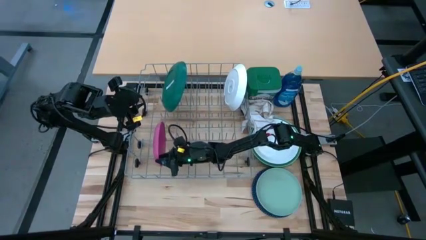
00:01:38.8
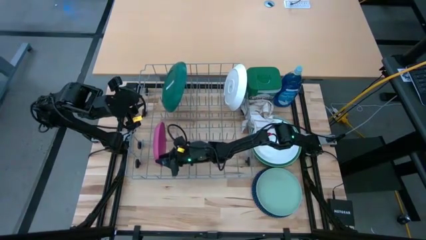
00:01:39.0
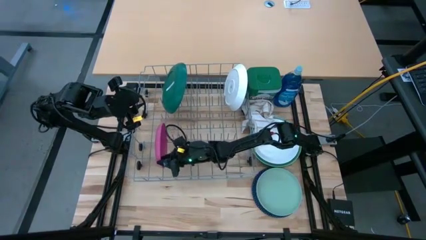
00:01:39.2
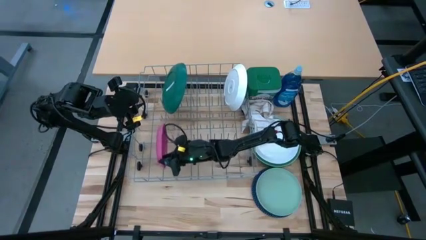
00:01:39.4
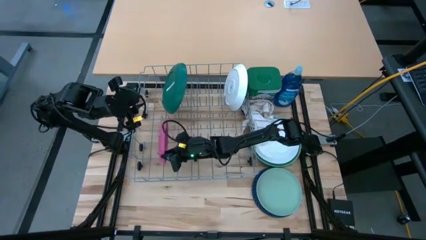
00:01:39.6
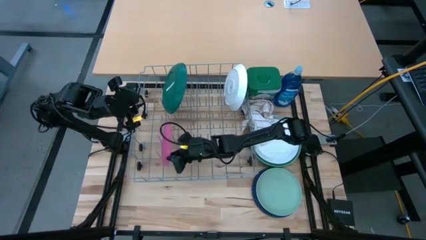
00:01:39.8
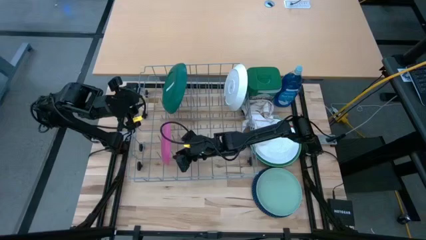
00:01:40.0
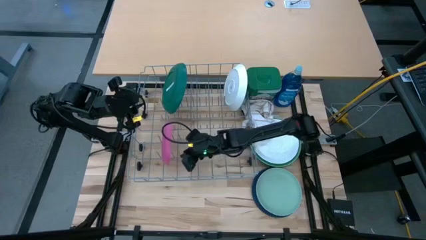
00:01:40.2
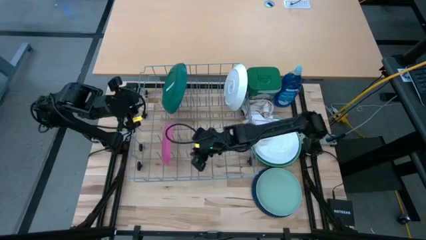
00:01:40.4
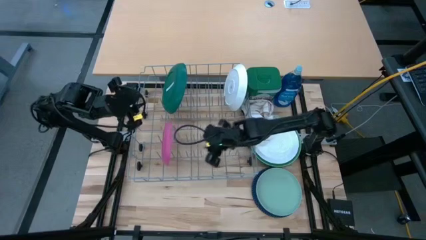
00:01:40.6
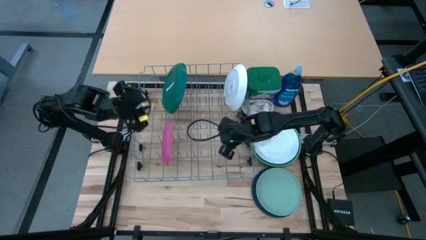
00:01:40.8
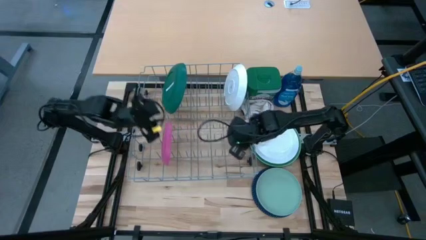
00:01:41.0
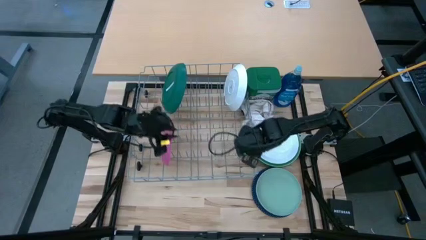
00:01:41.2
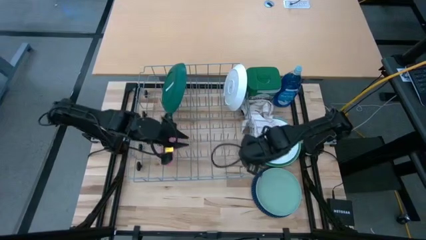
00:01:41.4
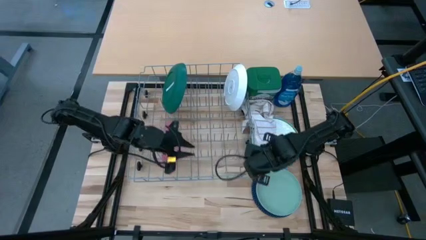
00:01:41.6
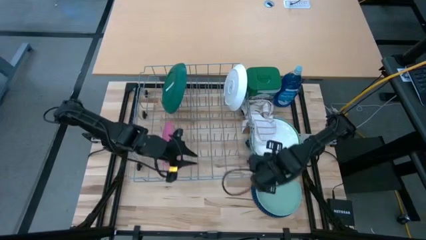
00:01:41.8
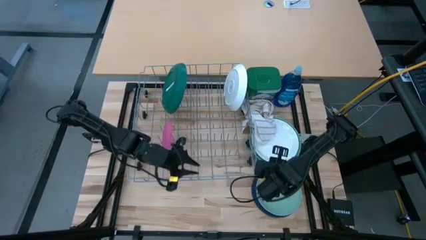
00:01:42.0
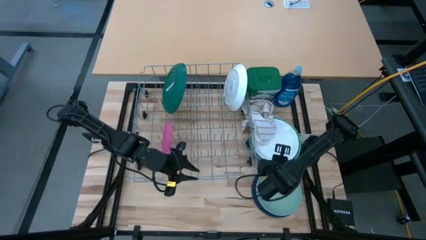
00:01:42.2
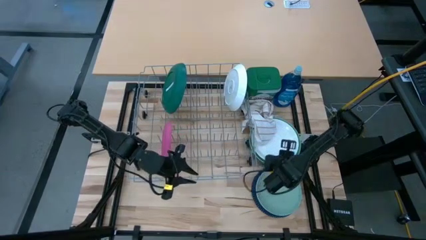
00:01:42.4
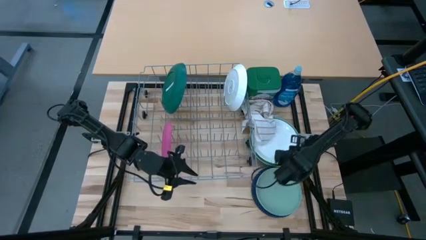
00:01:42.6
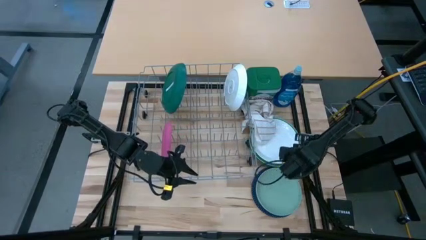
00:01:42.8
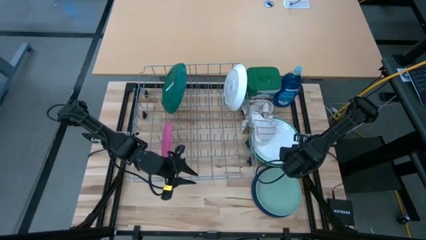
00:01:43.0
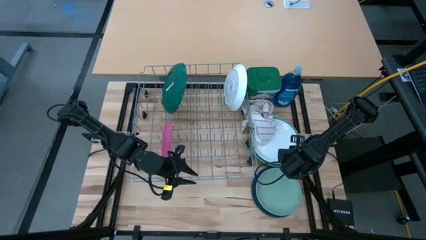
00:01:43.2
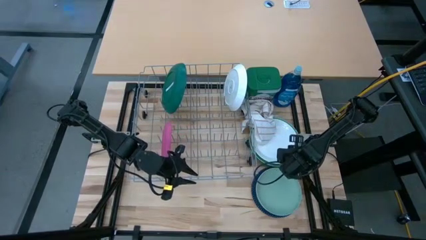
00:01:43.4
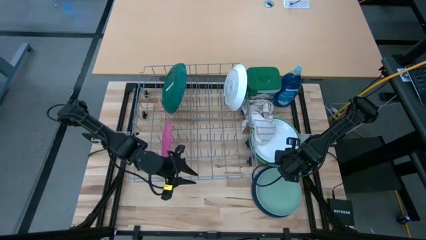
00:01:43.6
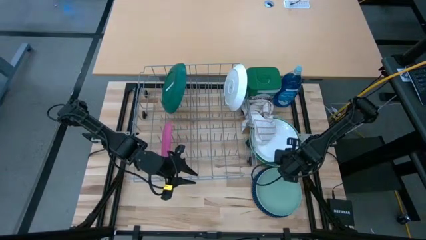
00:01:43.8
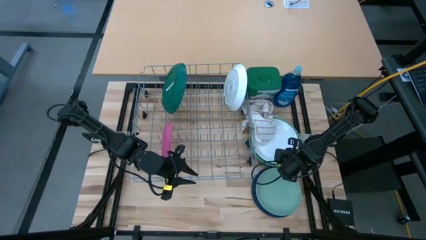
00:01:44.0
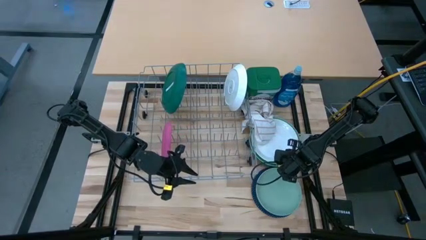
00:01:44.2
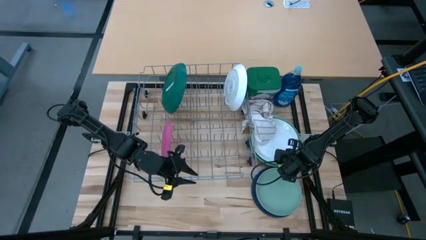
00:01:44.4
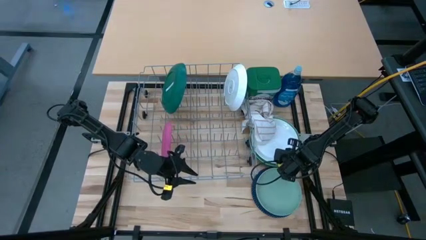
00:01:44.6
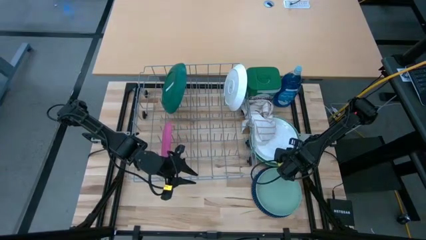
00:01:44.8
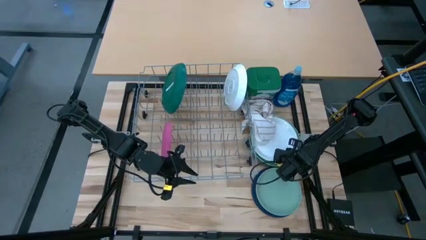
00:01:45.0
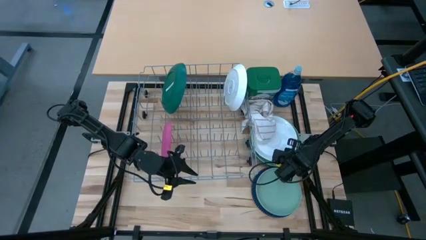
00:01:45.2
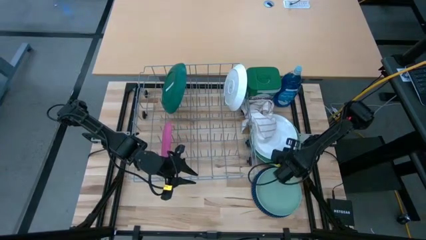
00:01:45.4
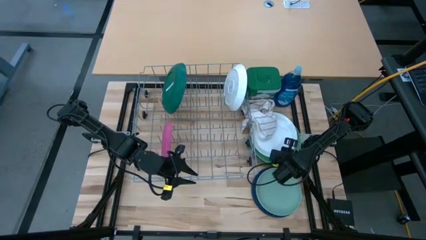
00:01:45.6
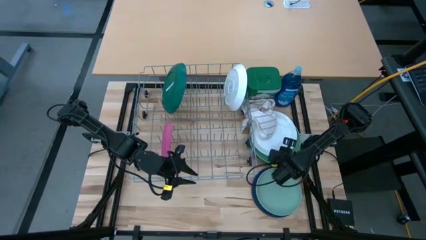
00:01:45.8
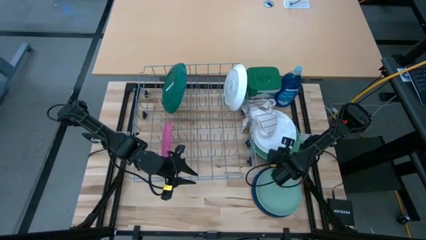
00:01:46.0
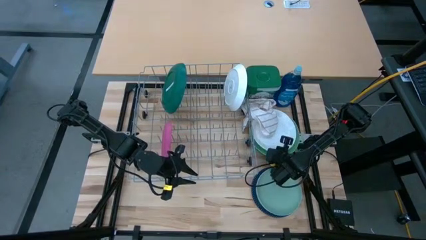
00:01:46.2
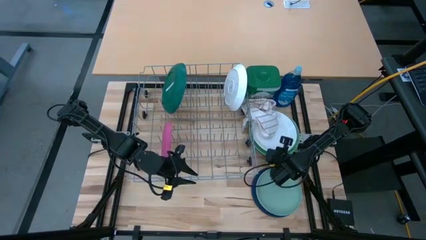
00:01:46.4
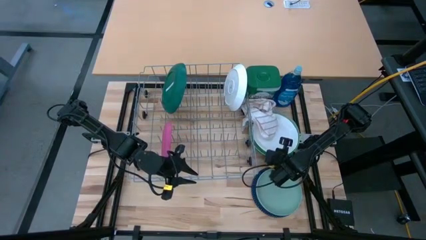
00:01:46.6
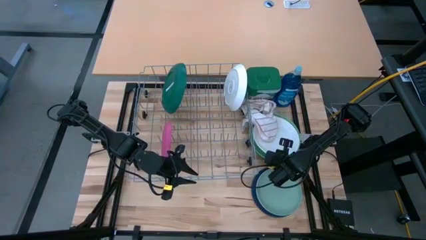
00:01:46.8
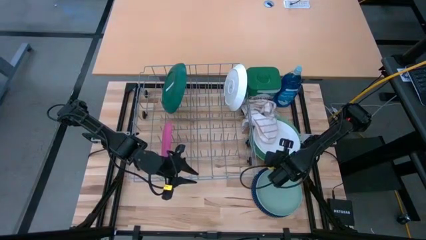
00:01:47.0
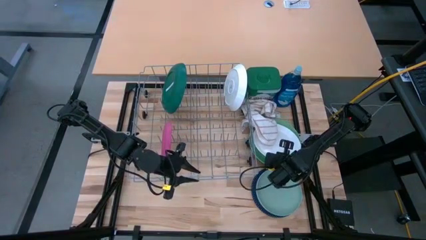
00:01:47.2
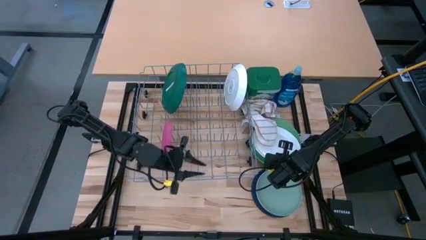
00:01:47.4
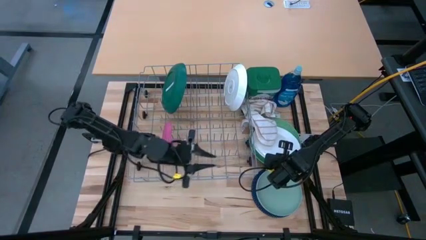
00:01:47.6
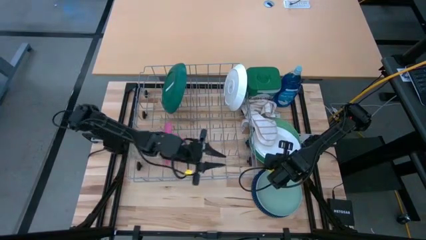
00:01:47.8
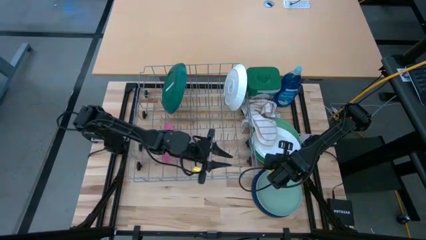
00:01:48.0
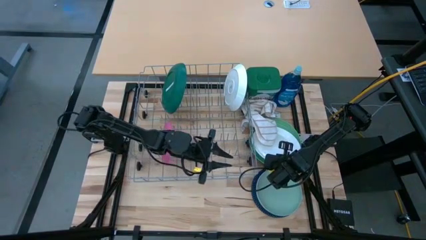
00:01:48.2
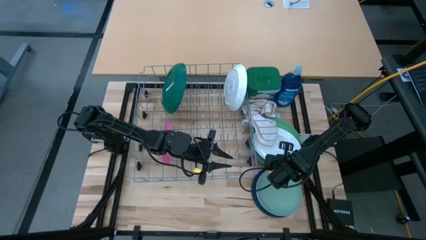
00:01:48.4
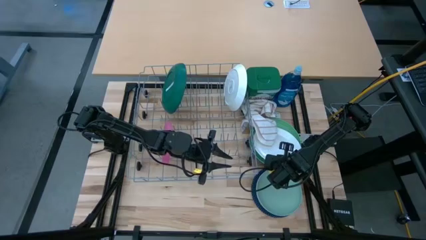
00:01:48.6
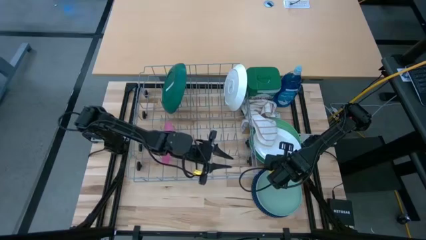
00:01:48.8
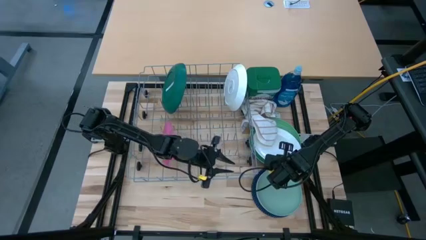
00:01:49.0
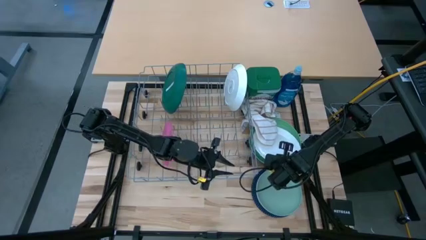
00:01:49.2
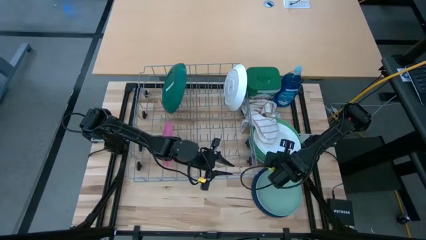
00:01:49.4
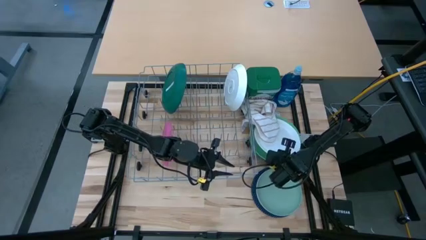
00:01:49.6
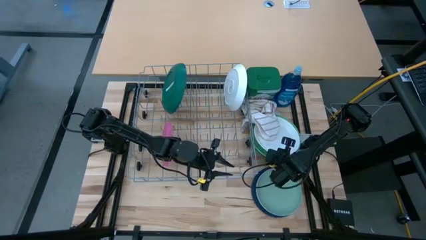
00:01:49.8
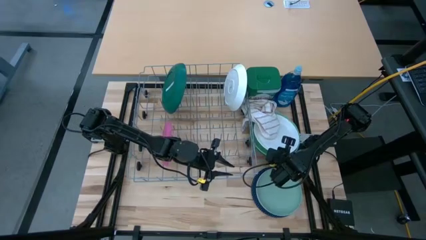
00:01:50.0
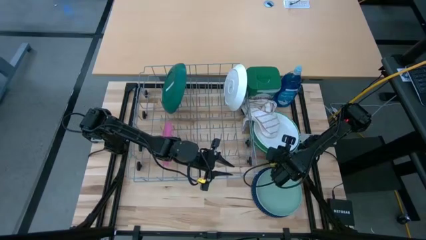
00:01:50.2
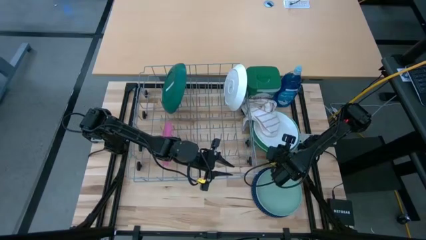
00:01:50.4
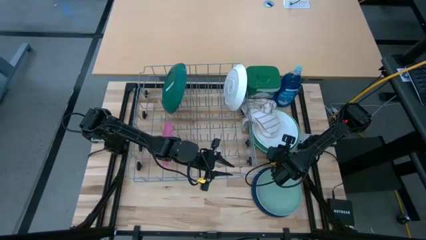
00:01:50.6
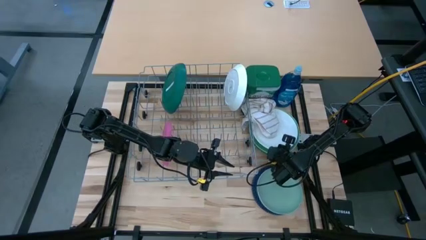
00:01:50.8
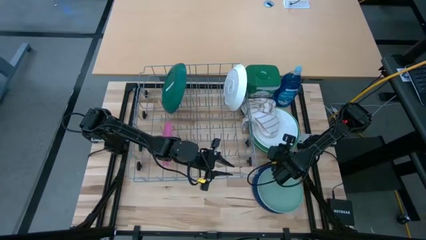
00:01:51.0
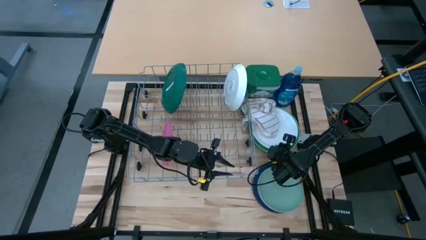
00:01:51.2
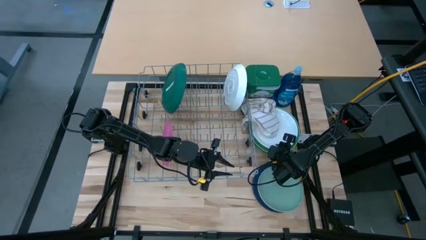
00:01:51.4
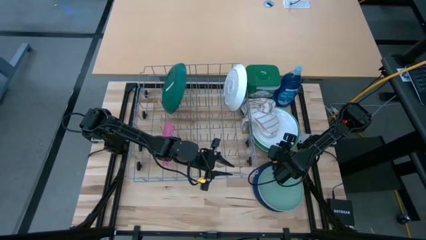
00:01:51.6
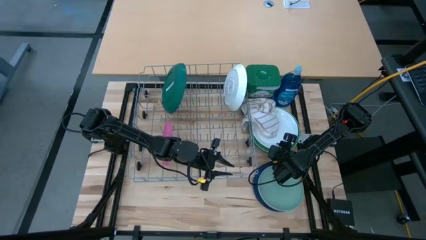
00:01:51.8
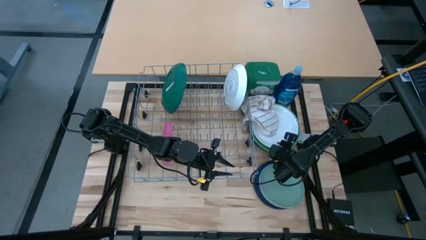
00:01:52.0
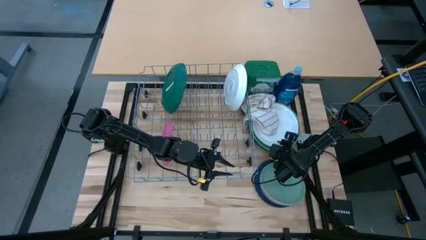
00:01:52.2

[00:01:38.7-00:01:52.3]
Task: Sort dishes
Put the white plate in the dish rack
